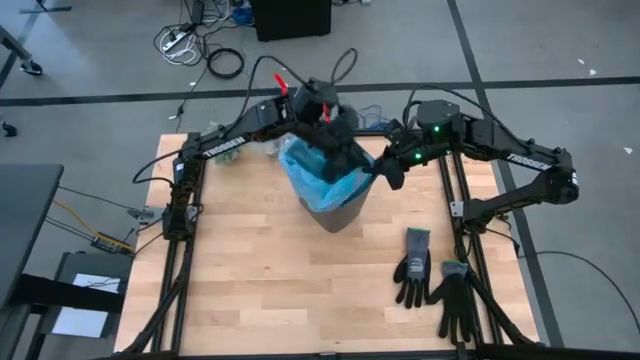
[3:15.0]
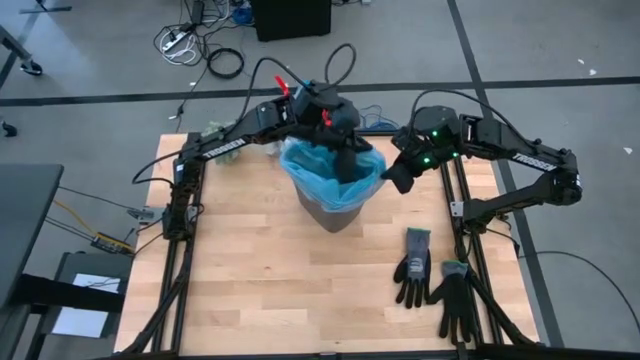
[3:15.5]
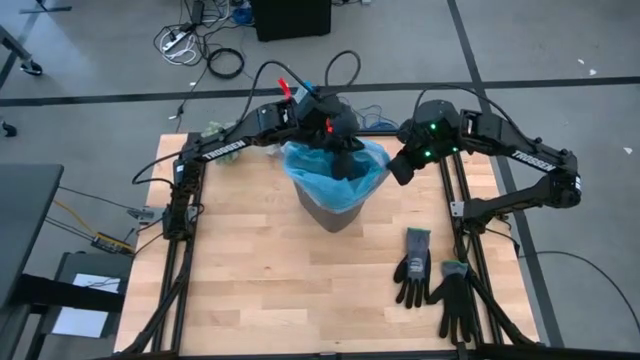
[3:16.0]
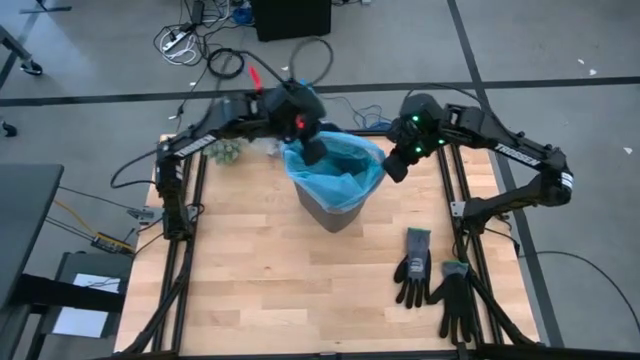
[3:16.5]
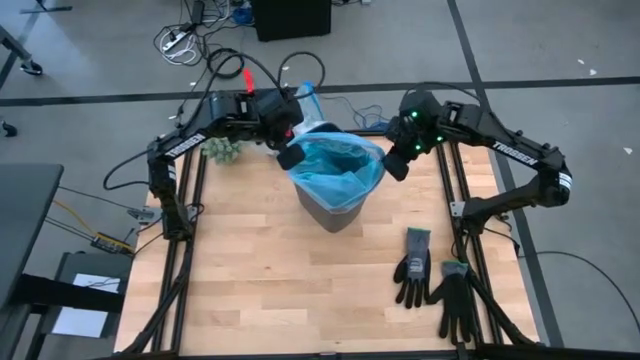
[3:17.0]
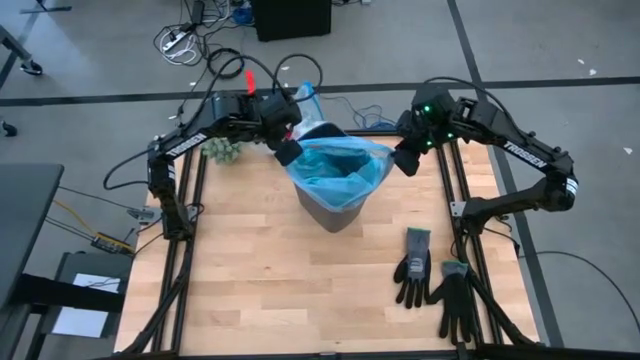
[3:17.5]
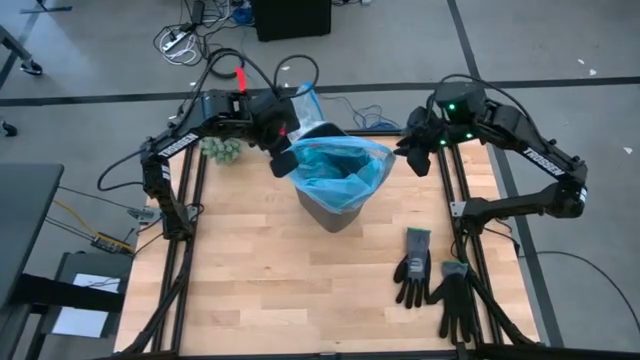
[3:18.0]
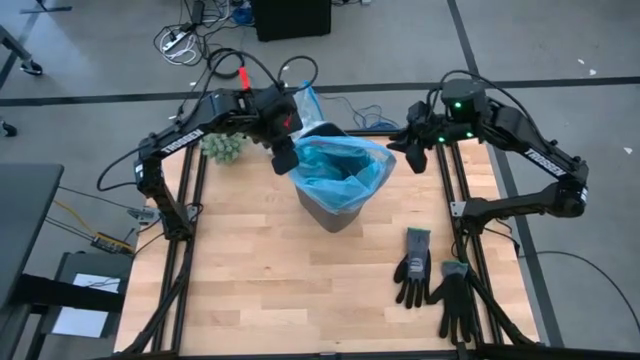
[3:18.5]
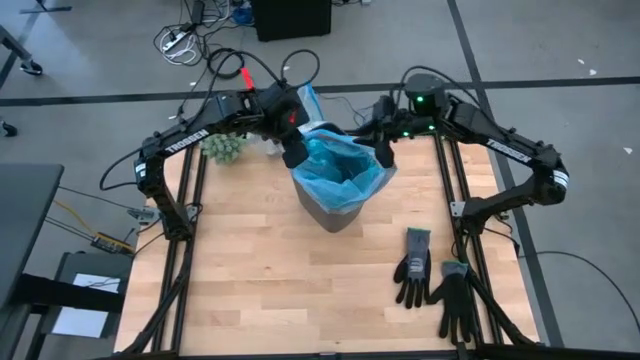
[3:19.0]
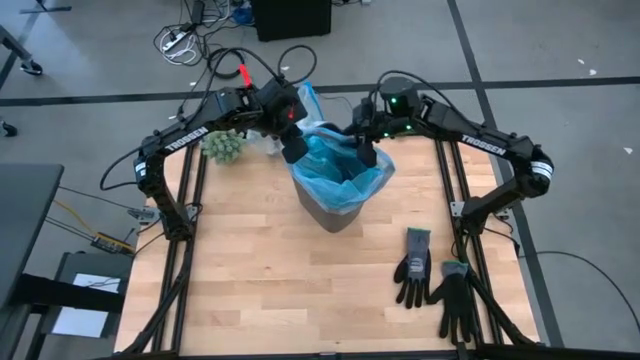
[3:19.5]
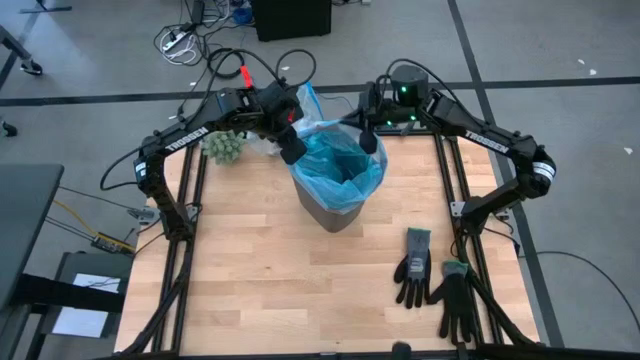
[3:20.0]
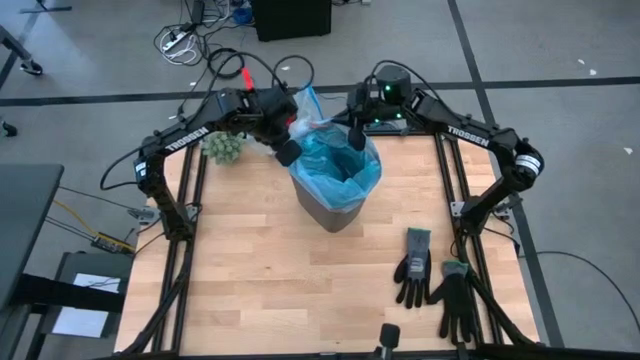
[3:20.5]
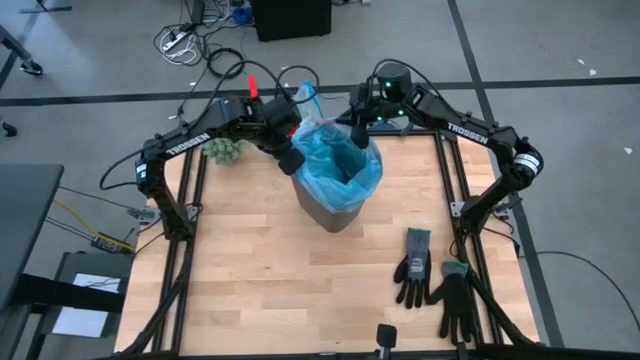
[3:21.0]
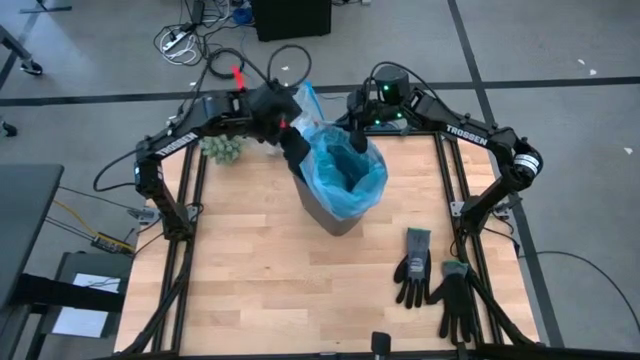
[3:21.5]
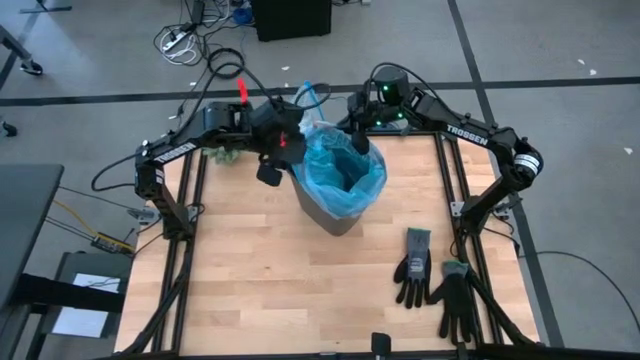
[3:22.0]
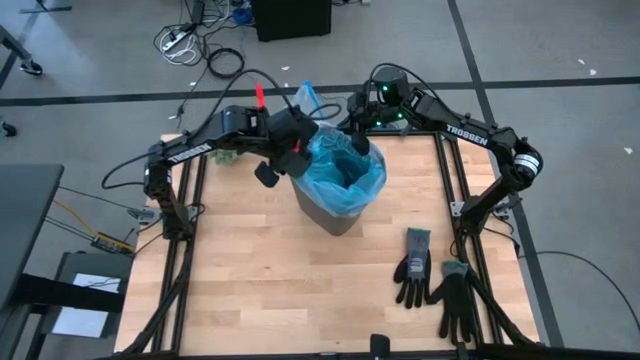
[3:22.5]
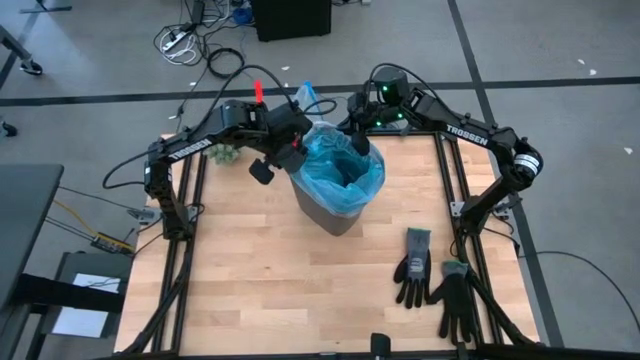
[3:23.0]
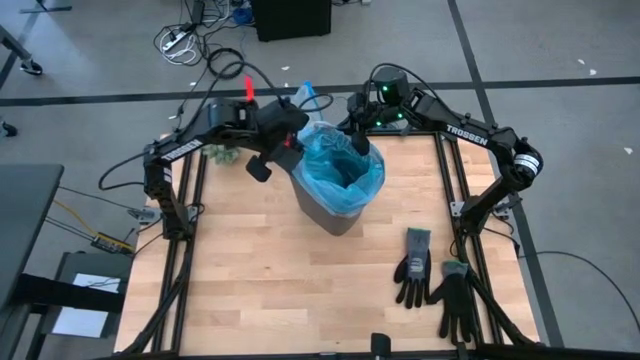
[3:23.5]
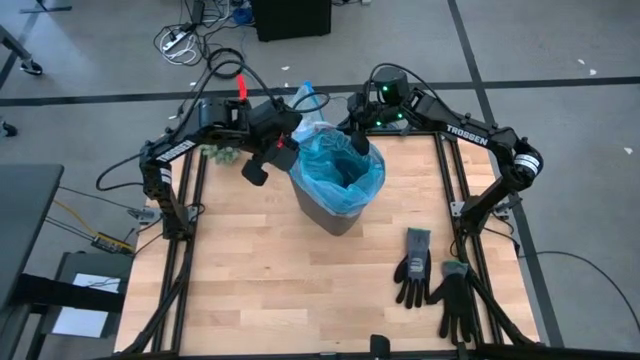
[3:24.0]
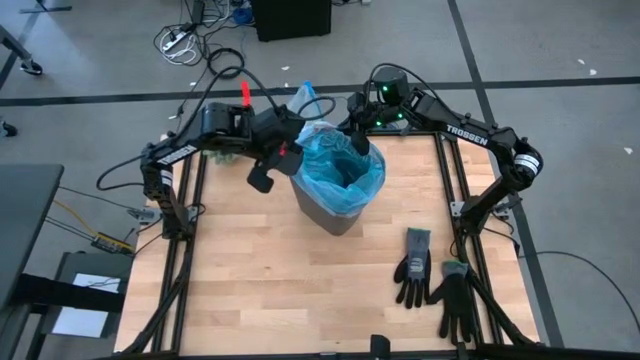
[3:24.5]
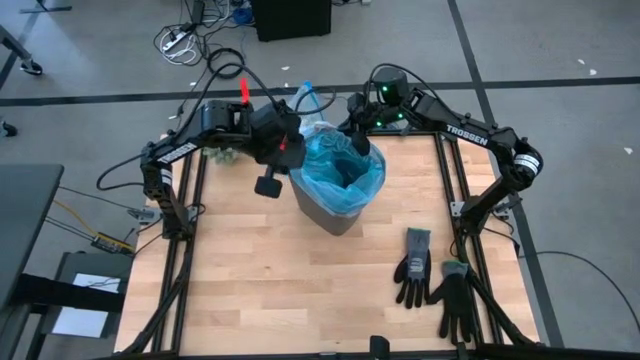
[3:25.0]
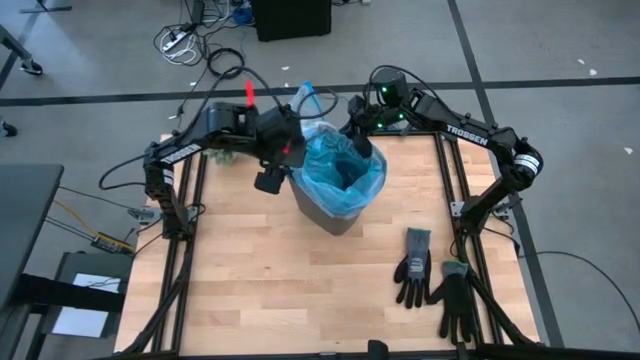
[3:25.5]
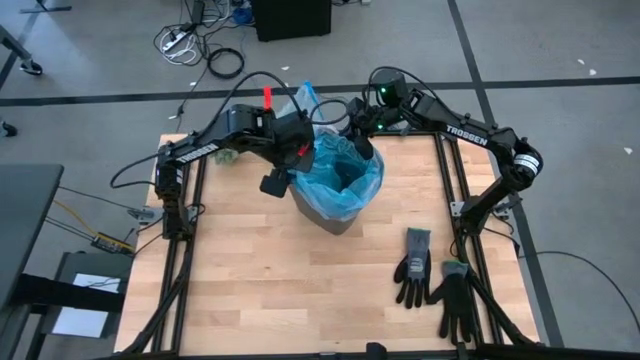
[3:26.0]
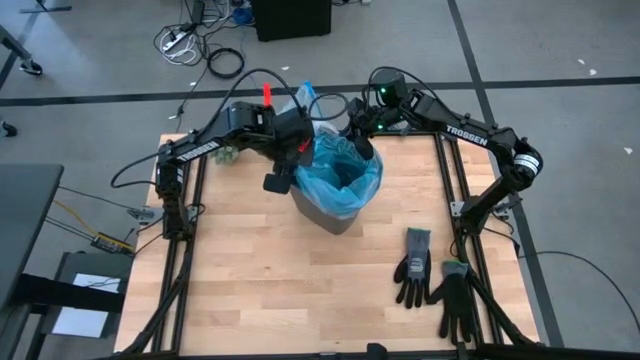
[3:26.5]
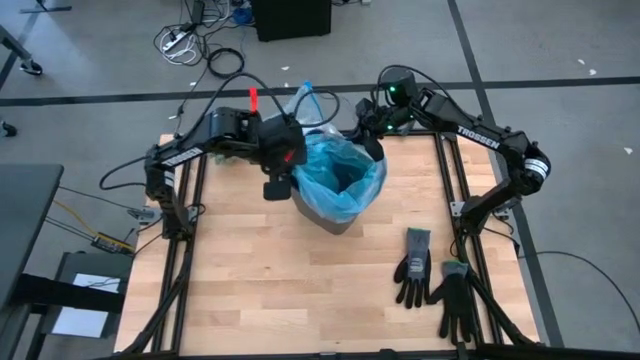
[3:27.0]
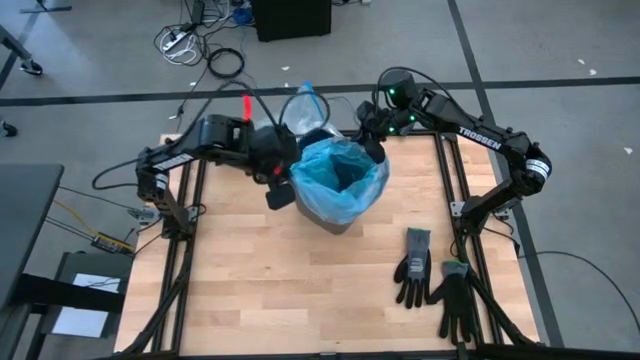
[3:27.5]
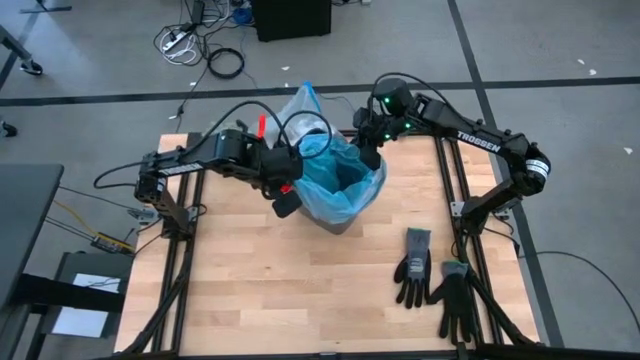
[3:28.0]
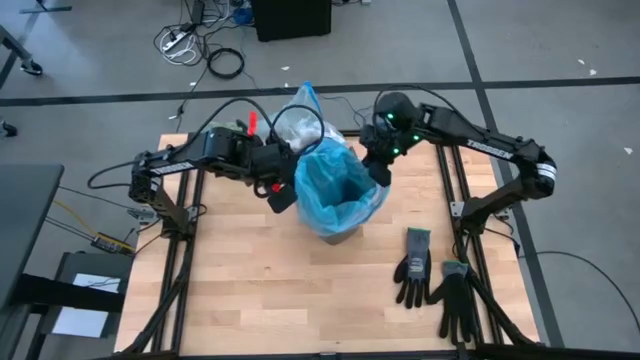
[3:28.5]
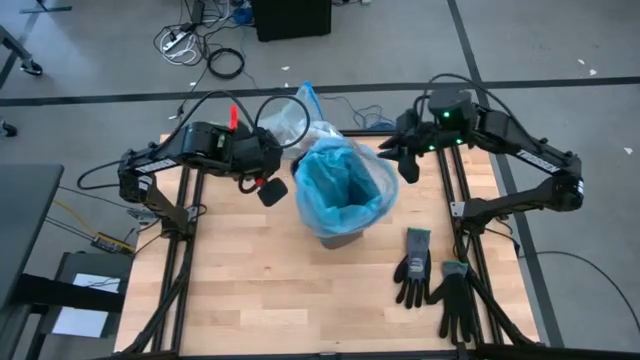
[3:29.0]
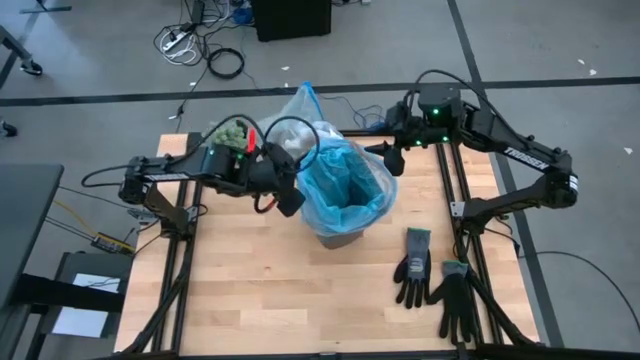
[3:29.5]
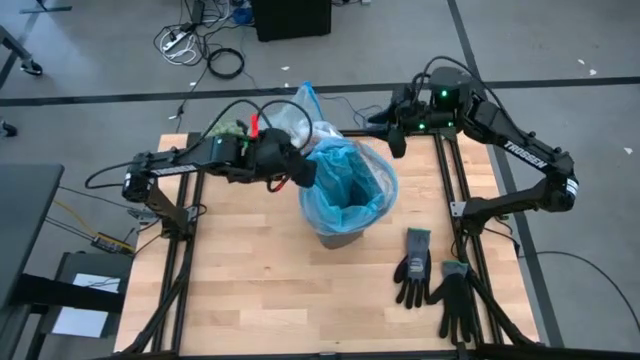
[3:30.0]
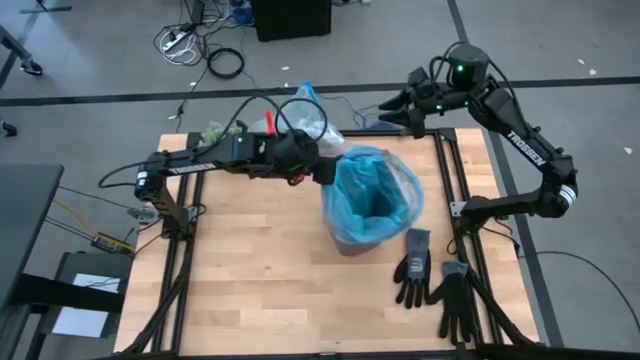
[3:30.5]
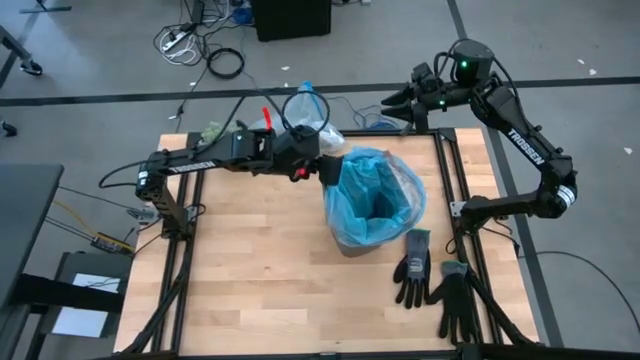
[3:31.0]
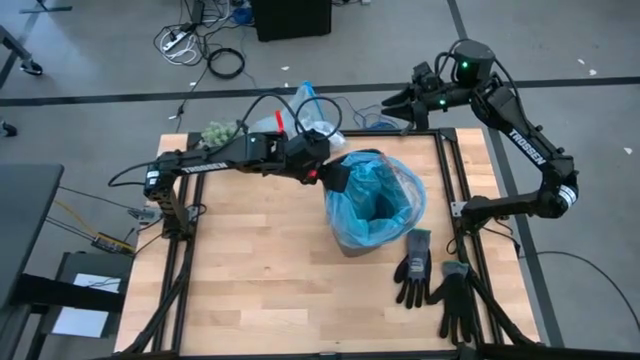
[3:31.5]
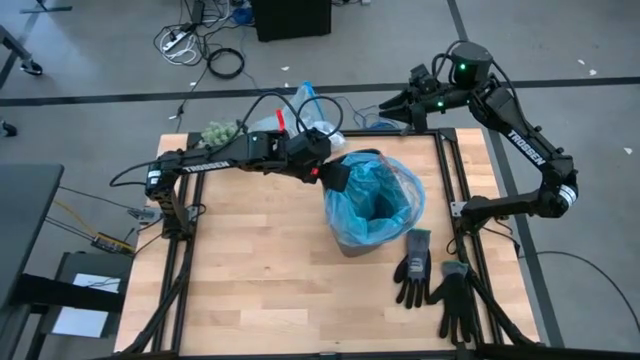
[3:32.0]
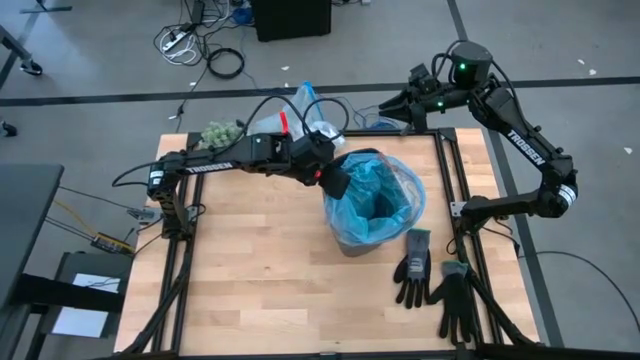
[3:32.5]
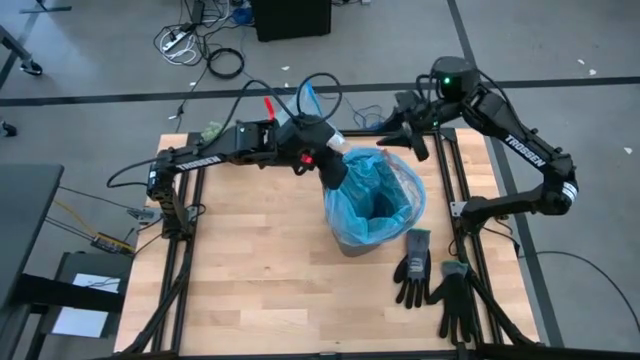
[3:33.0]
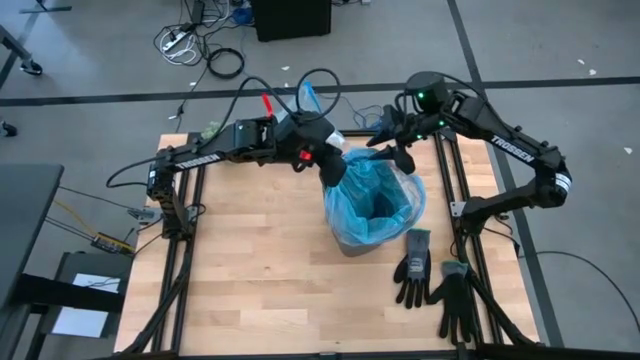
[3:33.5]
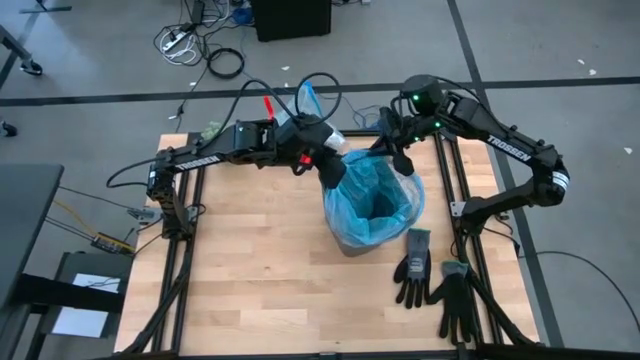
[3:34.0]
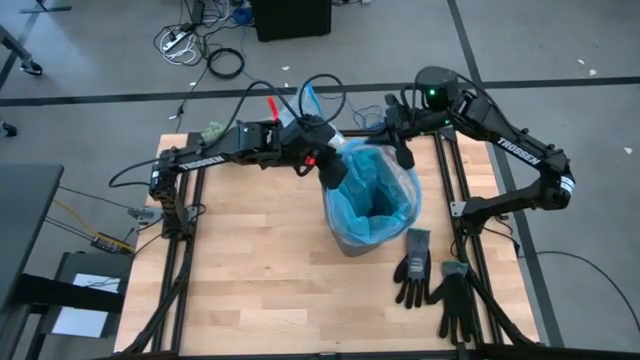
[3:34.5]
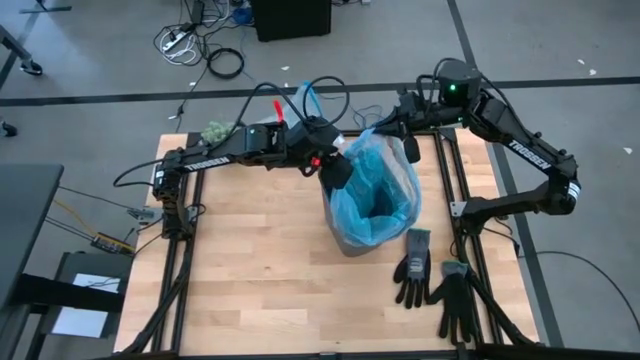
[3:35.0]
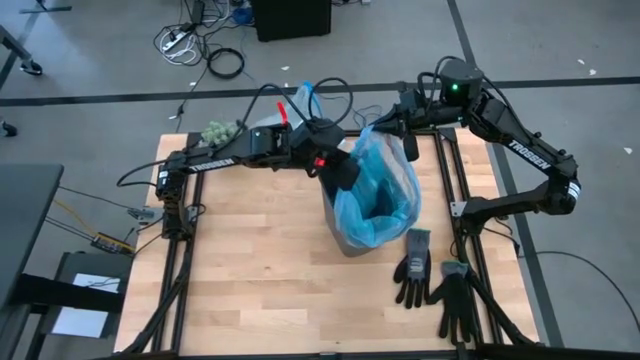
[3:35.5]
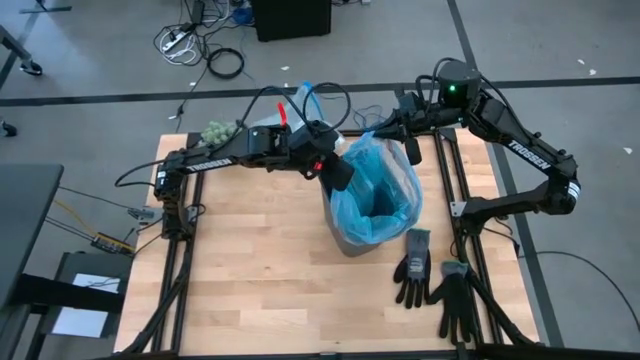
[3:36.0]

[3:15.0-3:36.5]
Task: place trash/remove bag and relplace
Insert the new blue trash bag into the trash bin
